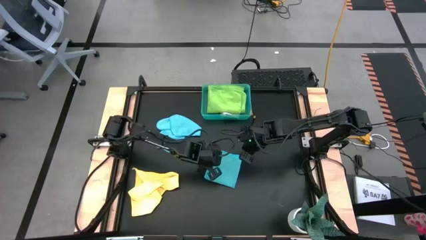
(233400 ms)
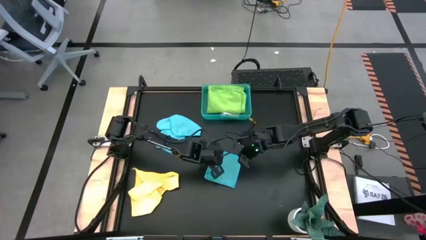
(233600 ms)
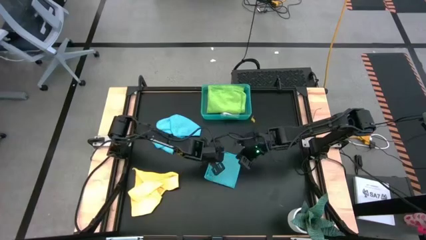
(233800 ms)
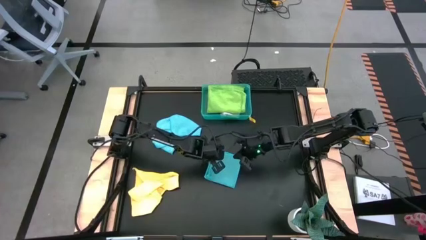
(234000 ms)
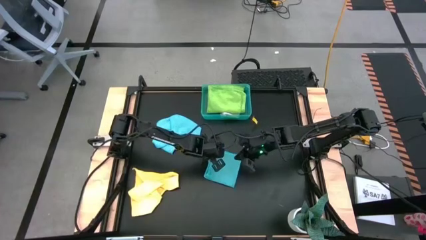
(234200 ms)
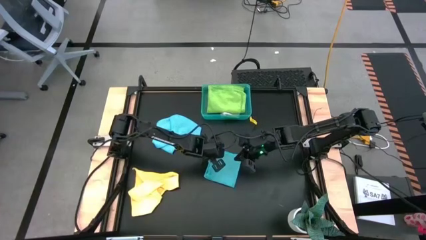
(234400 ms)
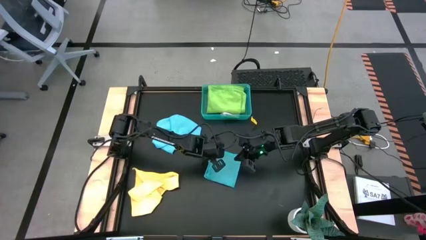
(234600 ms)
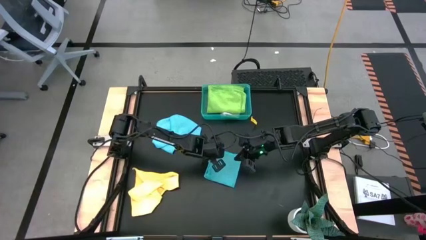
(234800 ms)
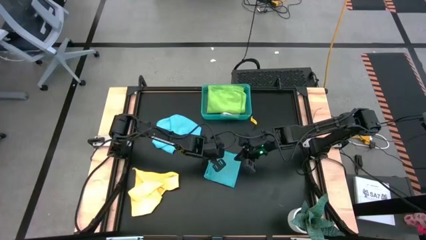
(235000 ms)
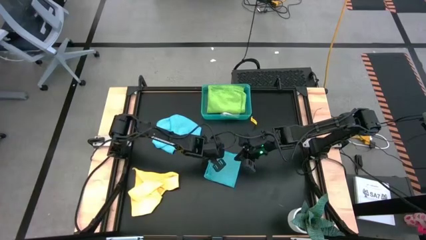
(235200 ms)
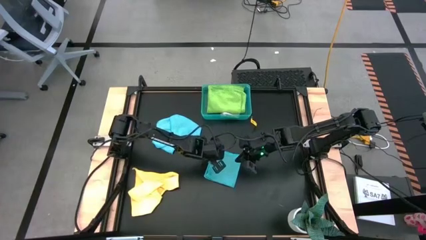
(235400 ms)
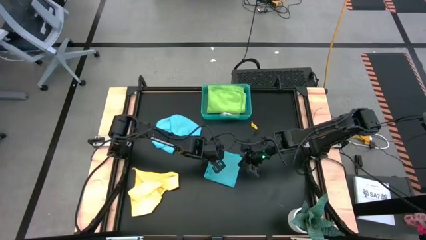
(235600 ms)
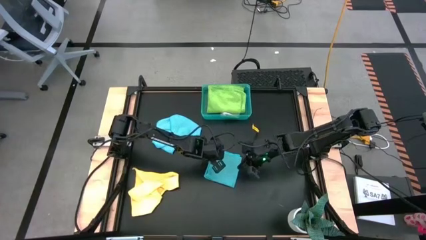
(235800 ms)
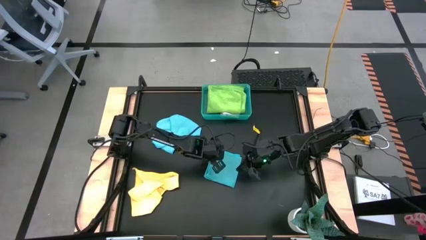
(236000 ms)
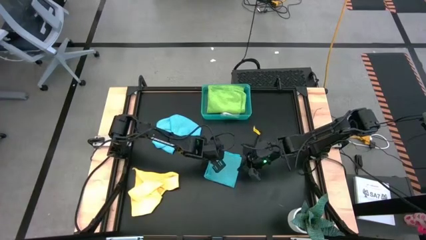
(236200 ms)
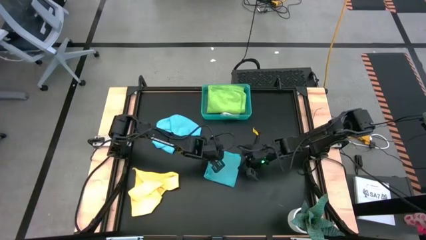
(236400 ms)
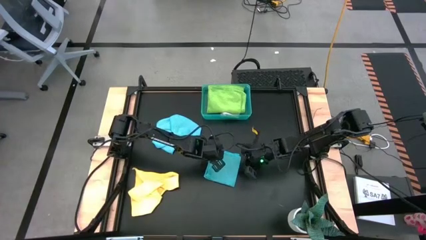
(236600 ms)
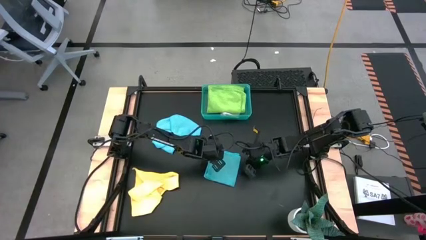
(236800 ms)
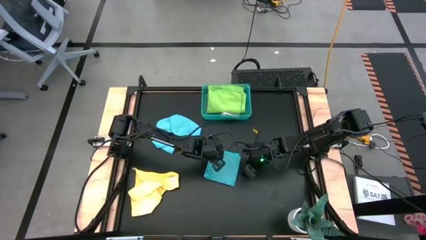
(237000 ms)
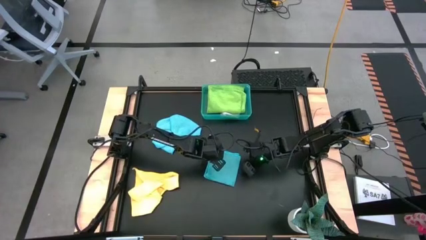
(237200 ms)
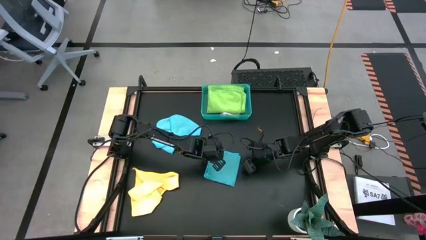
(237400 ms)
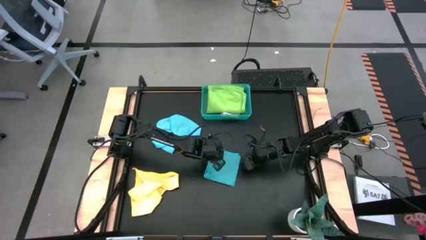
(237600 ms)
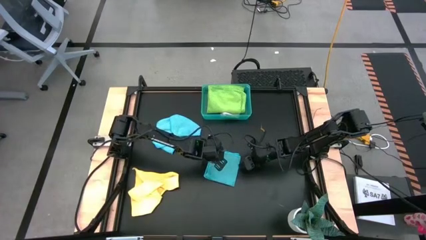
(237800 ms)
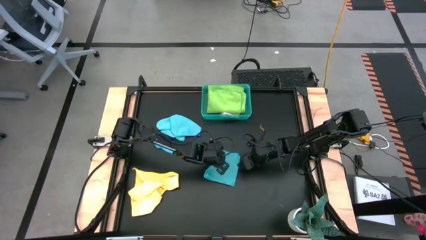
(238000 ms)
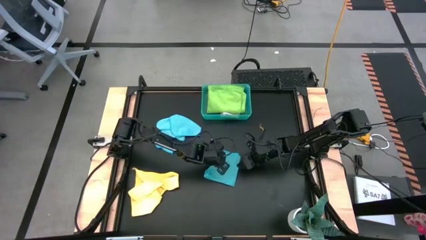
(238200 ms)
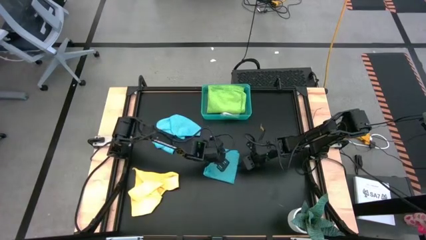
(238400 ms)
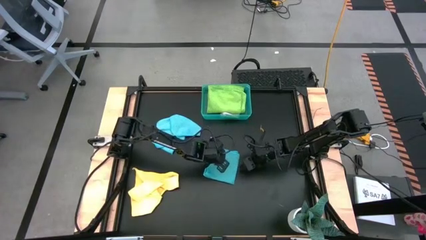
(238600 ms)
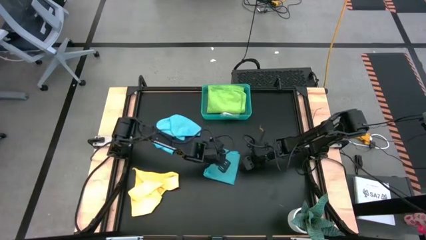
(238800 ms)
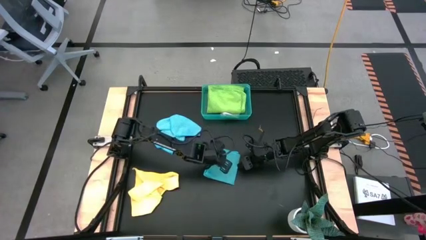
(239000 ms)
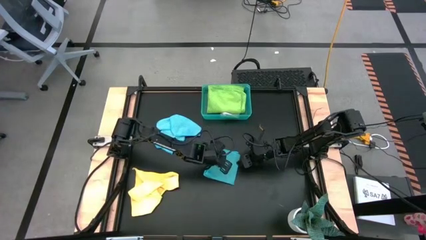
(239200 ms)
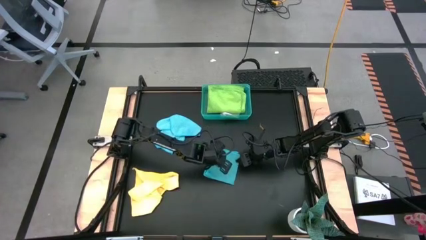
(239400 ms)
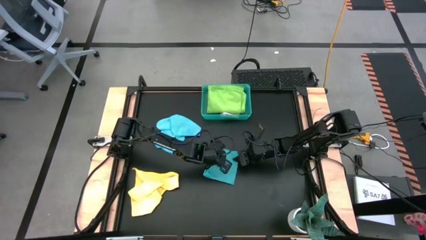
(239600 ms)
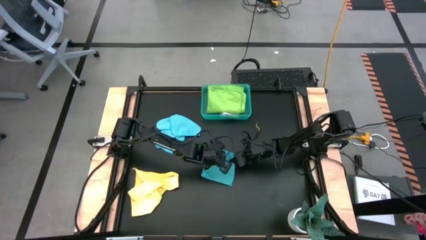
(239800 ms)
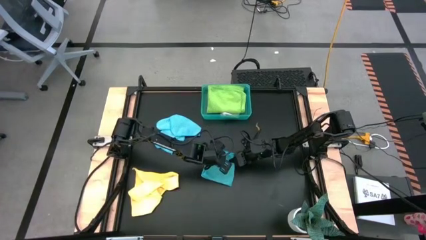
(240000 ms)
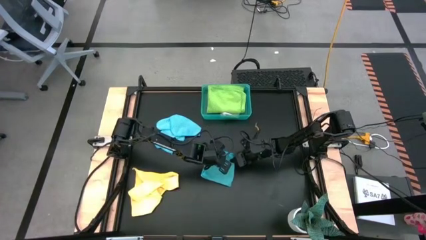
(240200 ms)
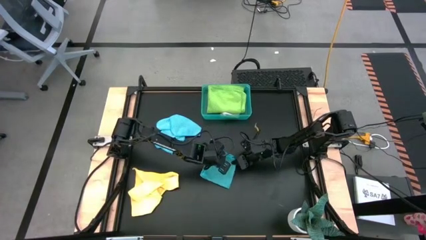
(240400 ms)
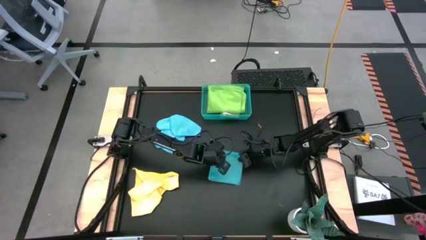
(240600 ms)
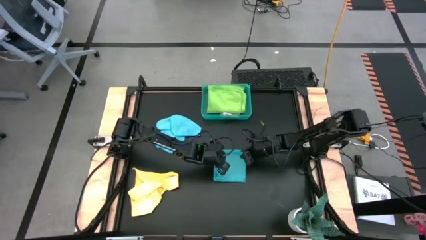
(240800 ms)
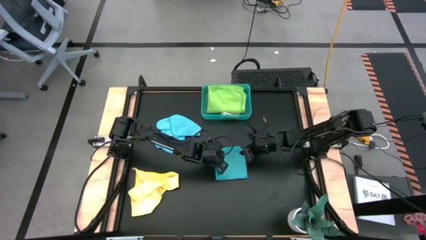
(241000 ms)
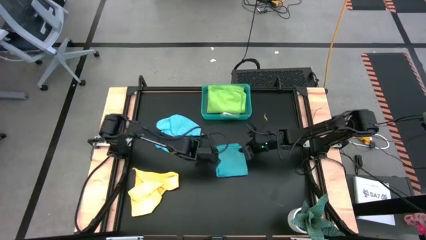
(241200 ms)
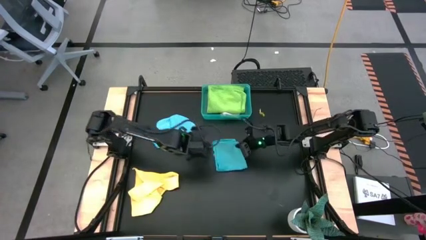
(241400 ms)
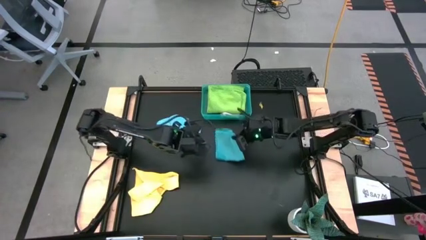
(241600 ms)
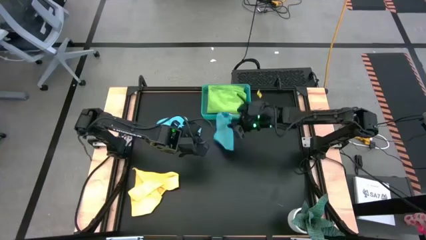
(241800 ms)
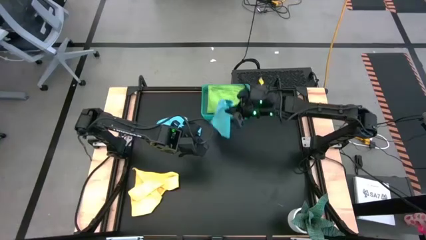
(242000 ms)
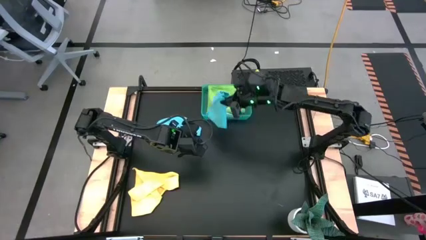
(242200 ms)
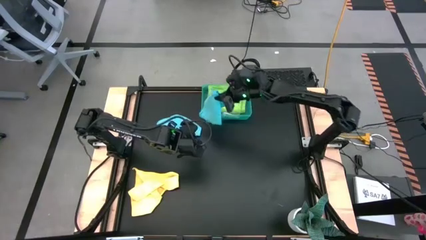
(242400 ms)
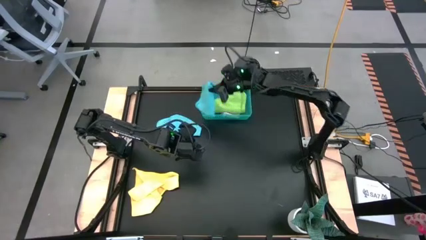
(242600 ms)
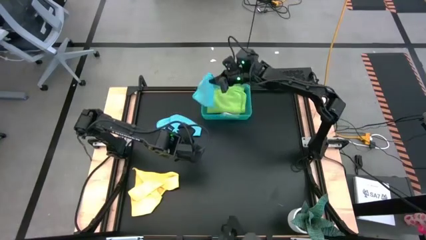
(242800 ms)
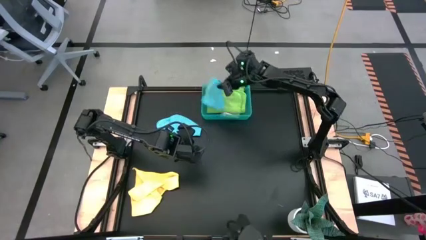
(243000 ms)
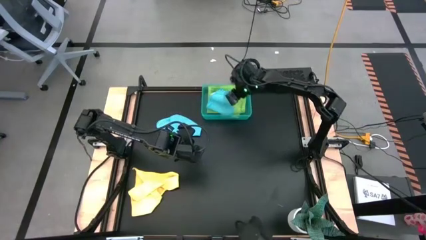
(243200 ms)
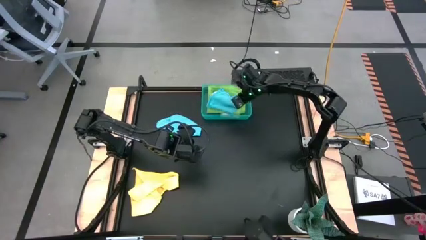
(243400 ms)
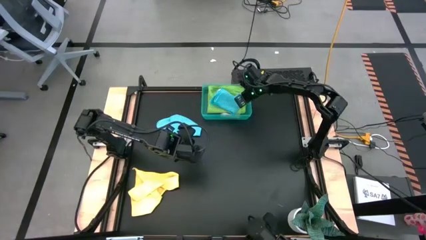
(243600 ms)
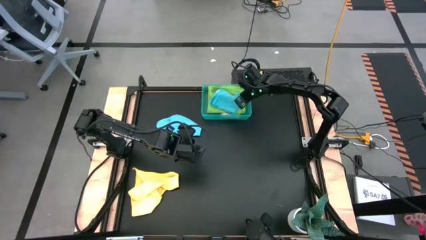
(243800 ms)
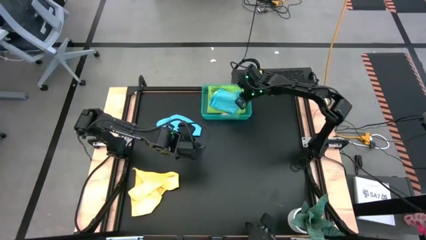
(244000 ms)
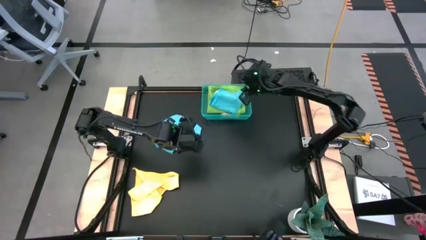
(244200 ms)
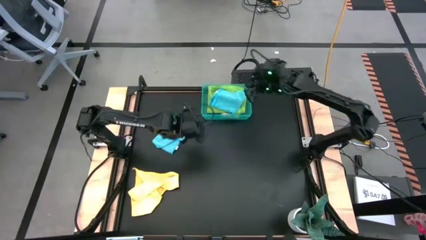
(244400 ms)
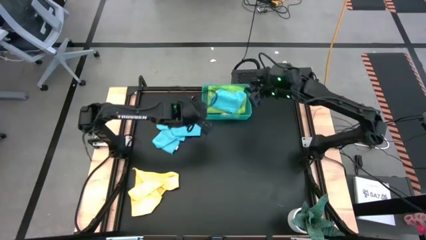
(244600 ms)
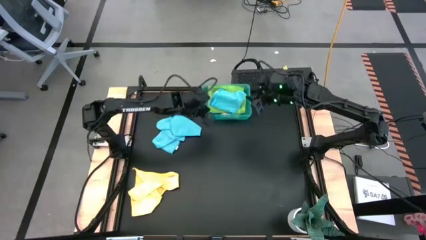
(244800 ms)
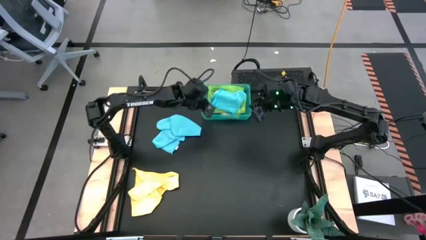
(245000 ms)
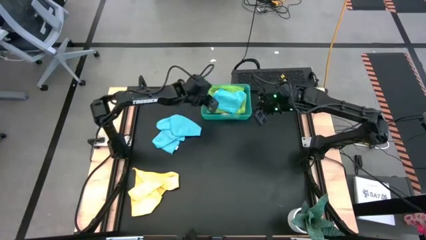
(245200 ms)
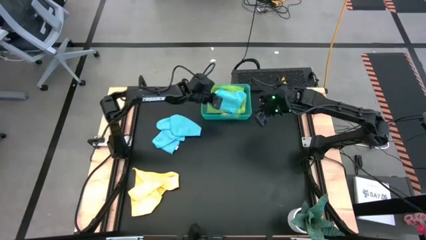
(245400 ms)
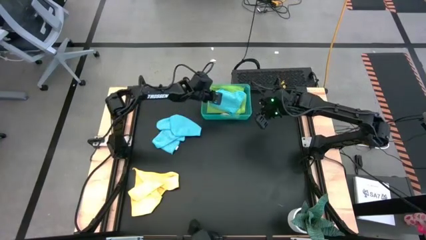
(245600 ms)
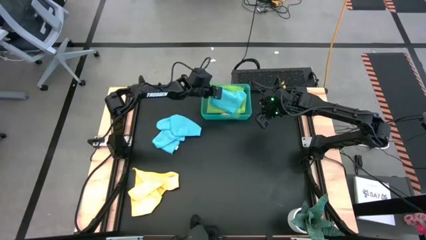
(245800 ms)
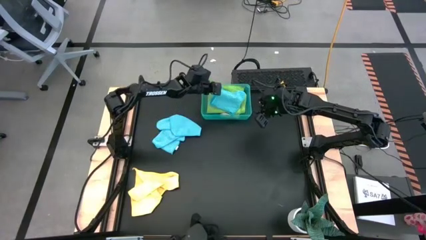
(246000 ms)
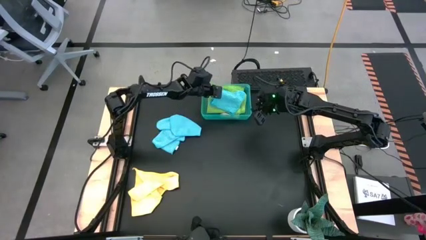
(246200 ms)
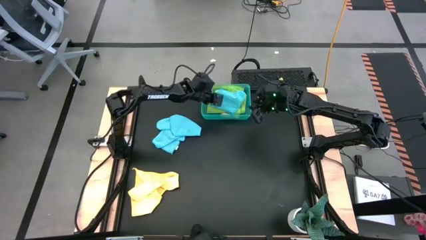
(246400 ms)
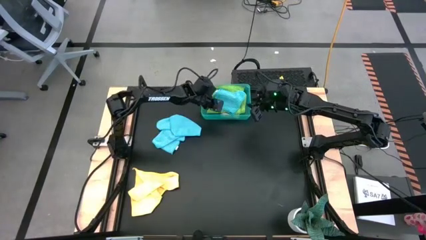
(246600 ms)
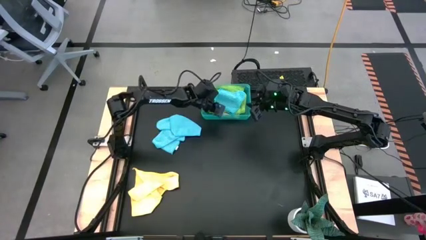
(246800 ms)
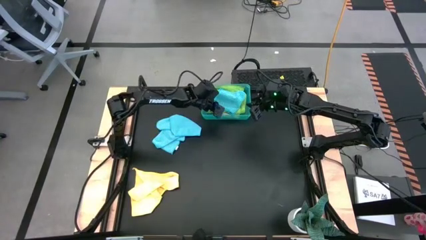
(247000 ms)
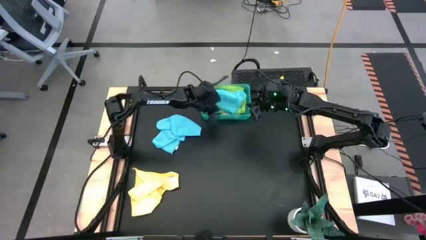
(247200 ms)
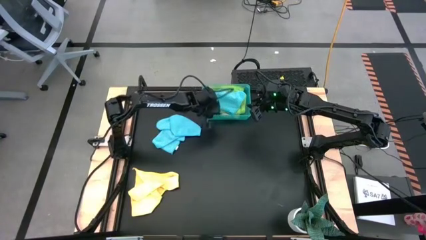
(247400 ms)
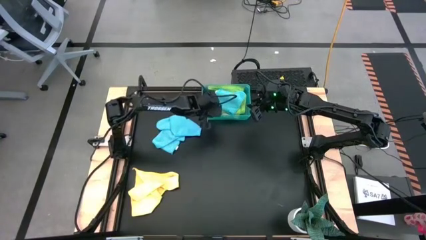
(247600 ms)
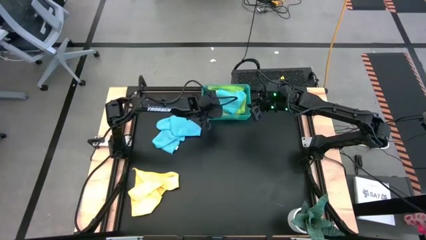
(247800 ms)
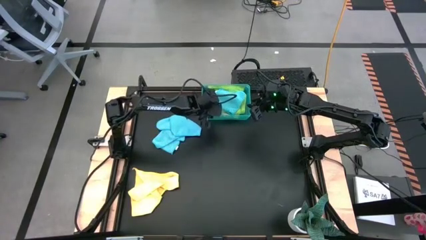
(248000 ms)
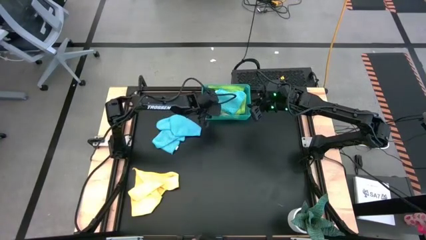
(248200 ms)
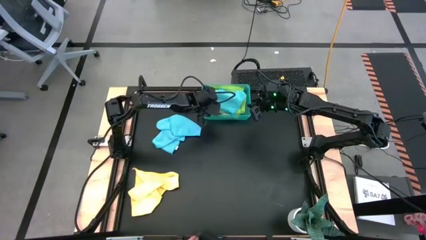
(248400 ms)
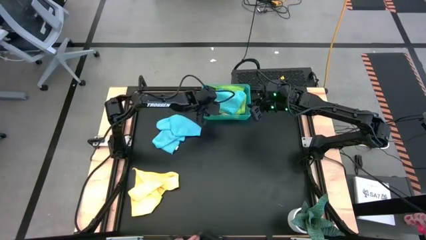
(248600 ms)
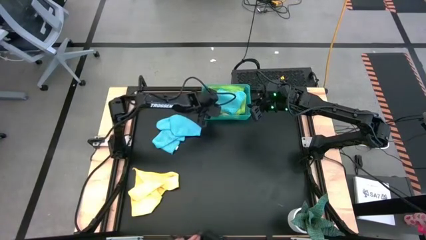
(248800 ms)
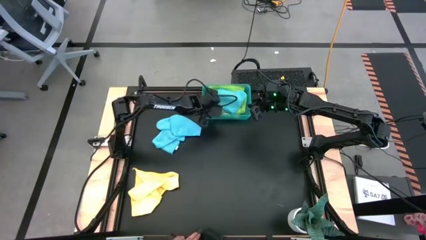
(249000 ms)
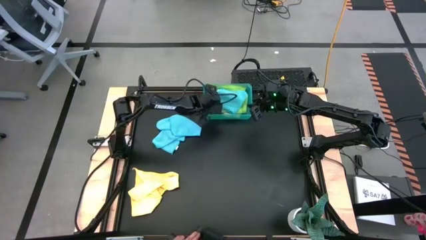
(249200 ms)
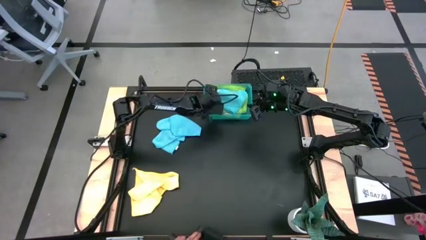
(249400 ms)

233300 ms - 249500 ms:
Task: Fold microfiber towels
Put the blue microfiber towel into the blue bin
